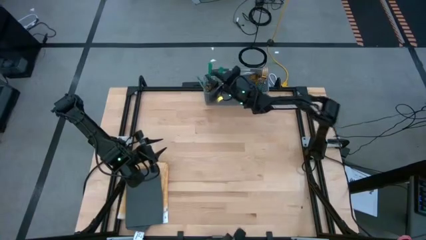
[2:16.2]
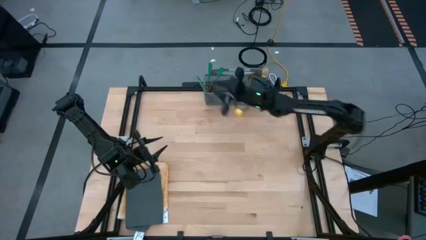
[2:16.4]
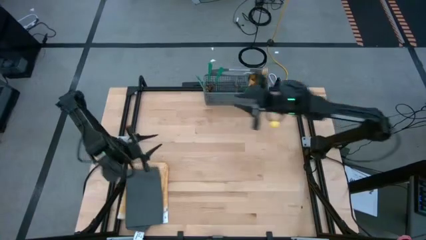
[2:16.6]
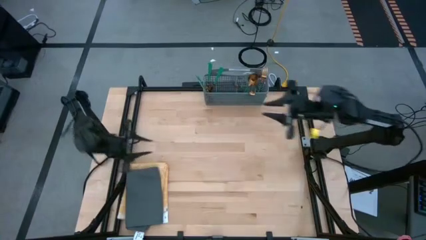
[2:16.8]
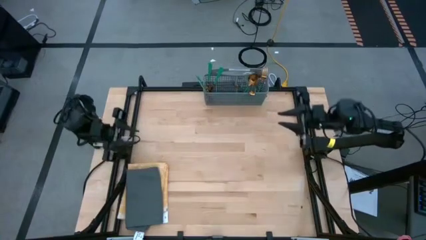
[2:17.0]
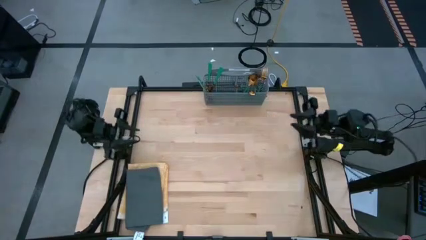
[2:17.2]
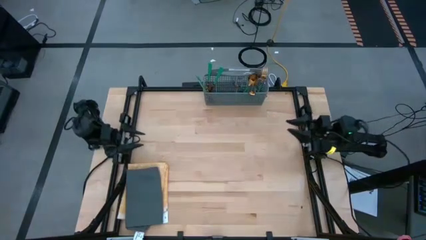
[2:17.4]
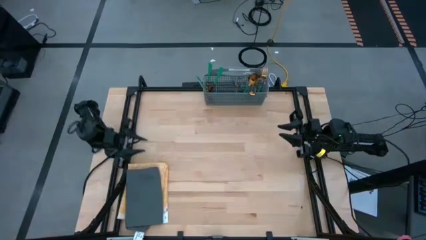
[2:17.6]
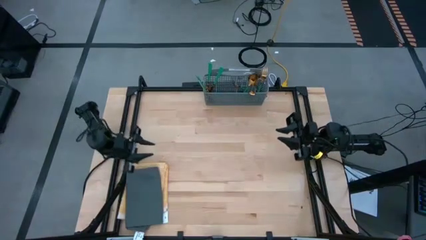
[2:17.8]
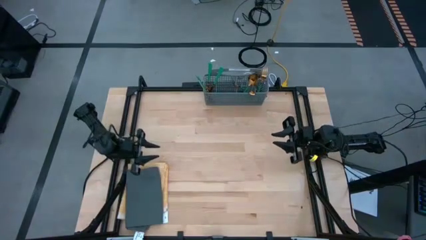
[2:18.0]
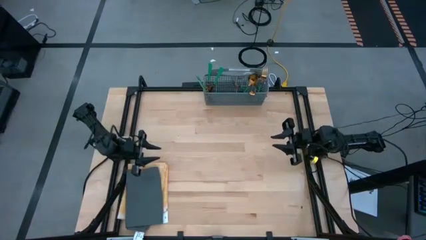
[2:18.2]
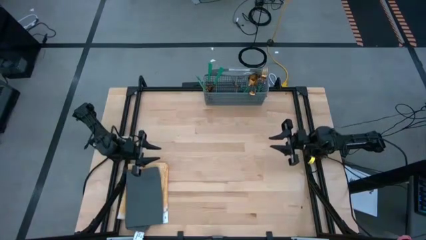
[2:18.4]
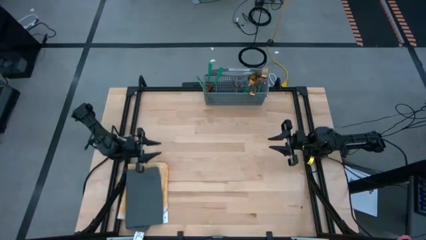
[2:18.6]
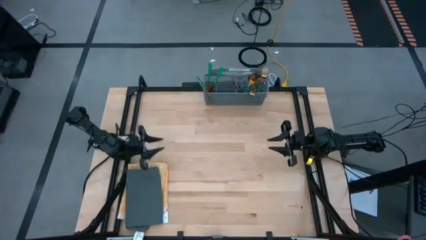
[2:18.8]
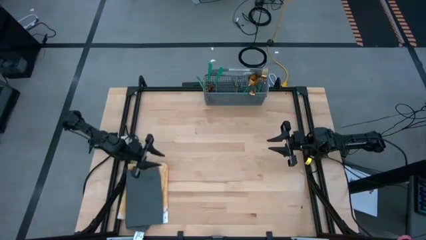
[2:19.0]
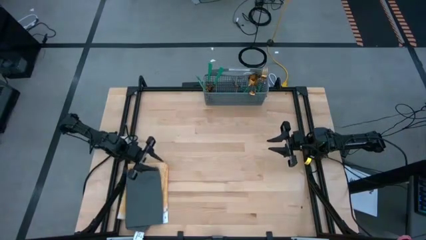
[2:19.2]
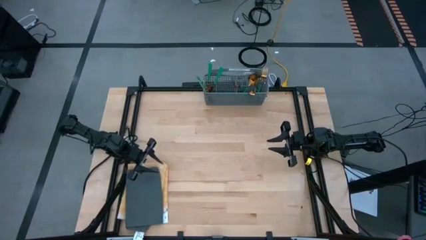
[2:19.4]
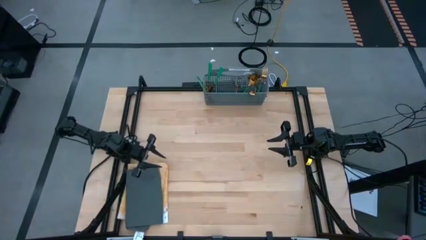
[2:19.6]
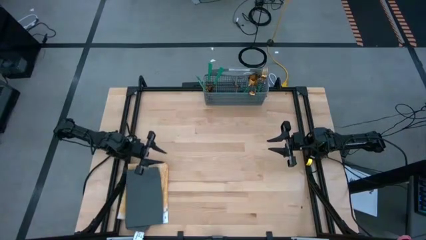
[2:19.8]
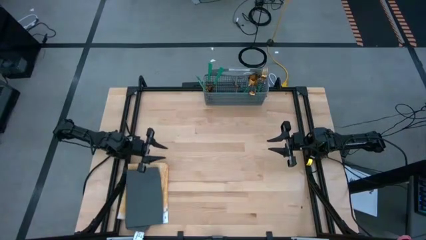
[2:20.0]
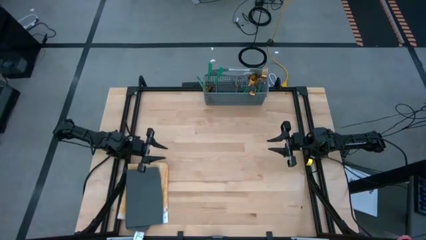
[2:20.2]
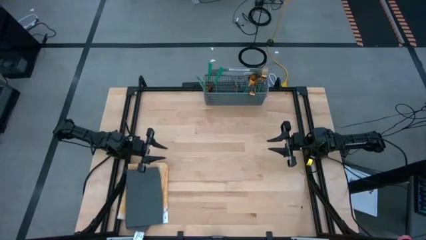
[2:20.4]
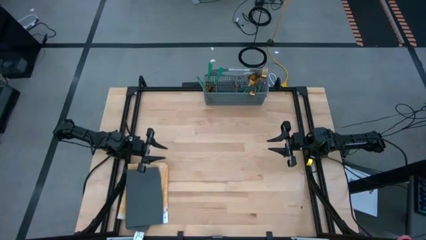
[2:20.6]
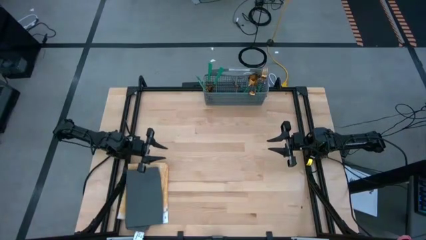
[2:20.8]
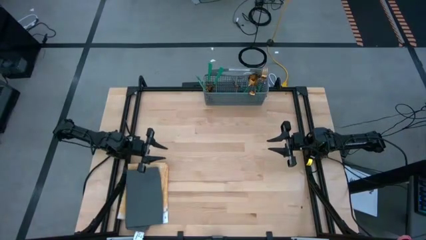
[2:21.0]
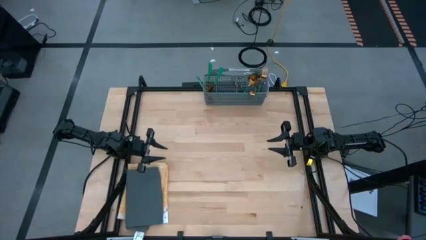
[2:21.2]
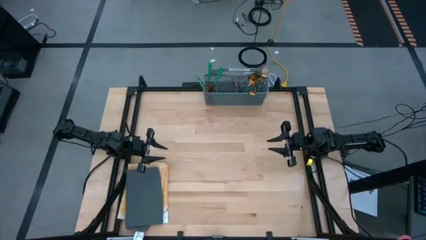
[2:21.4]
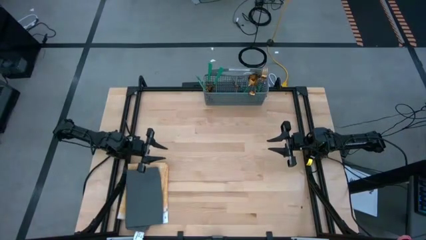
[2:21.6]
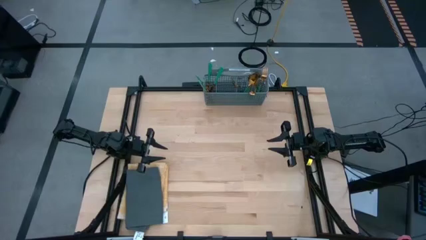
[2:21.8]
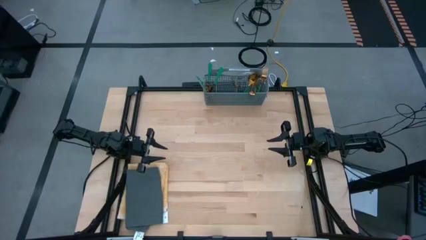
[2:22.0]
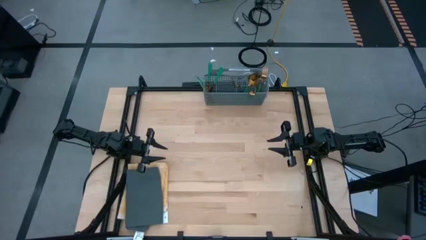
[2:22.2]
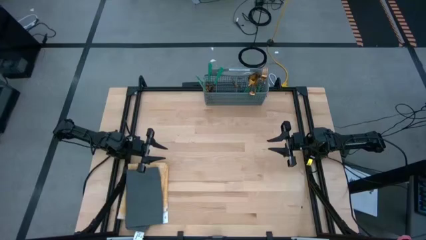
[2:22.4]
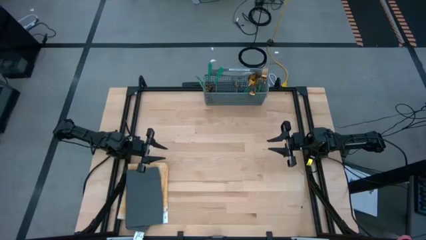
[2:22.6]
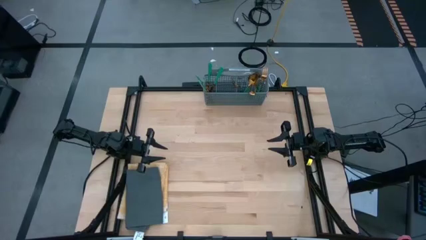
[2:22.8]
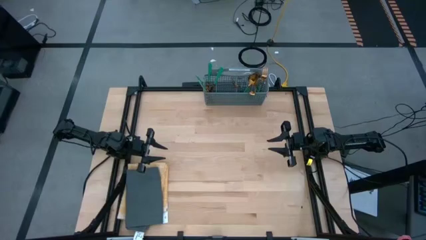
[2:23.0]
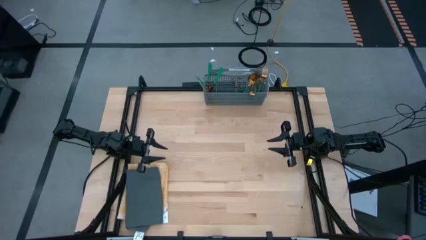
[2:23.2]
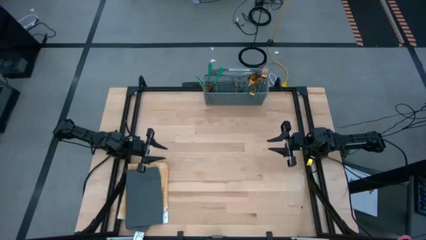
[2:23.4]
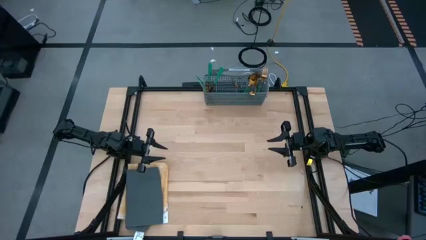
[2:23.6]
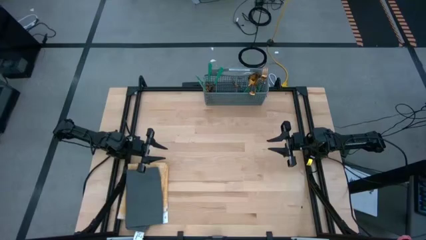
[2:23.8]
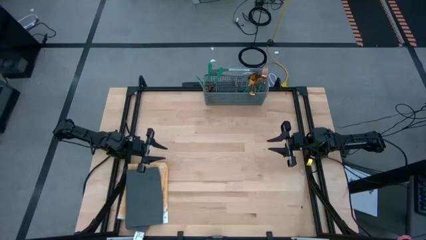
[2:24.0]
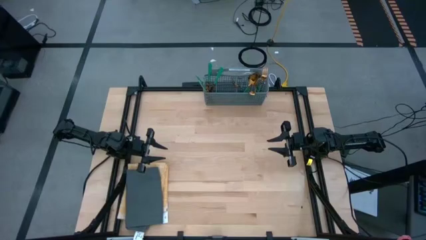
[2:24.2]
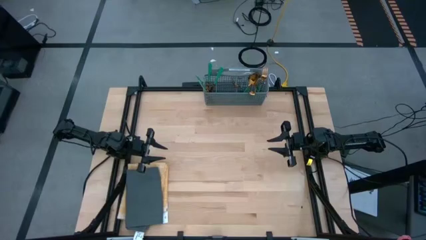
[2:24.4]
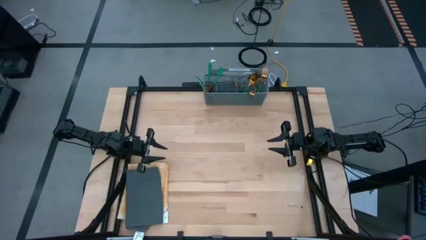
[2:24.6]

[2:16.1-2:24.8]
Task: Sort silverware
Return to Home Position

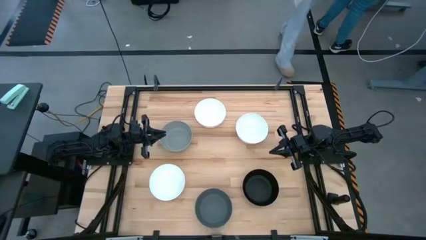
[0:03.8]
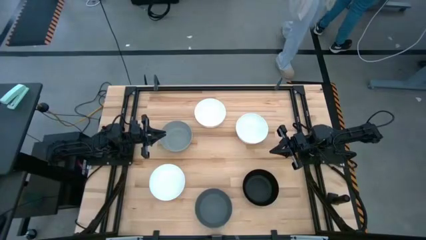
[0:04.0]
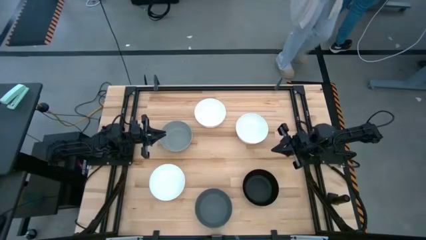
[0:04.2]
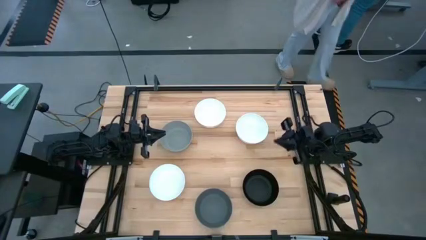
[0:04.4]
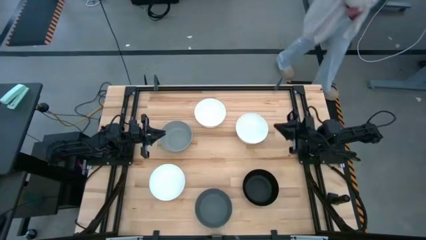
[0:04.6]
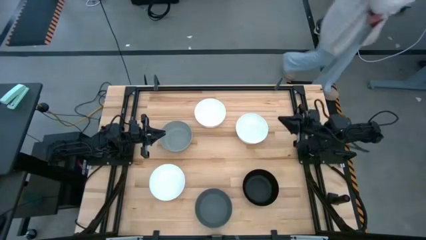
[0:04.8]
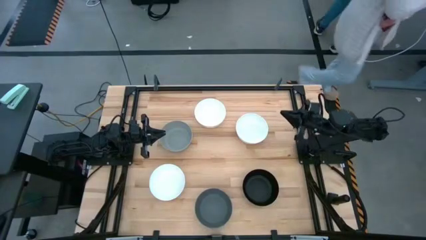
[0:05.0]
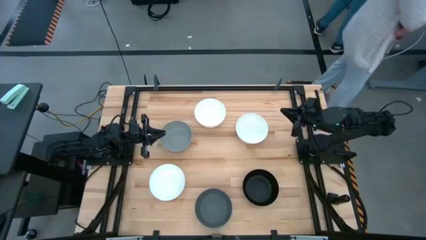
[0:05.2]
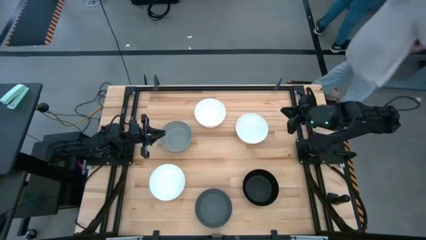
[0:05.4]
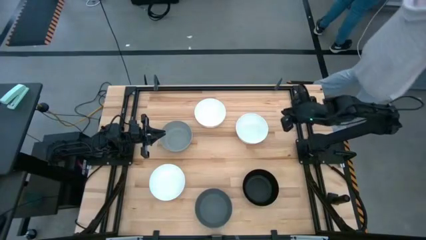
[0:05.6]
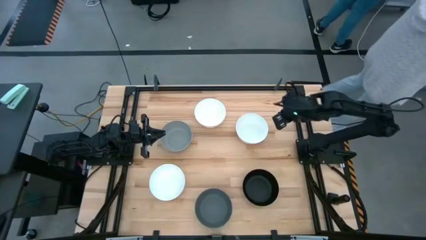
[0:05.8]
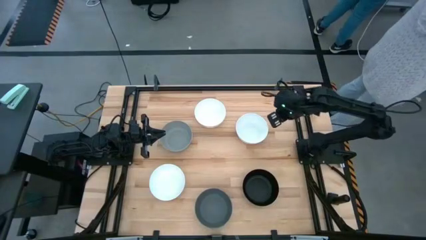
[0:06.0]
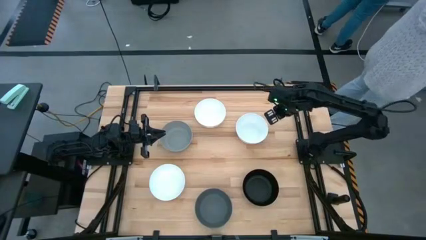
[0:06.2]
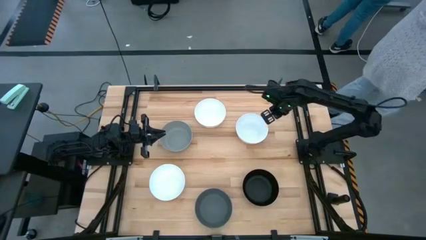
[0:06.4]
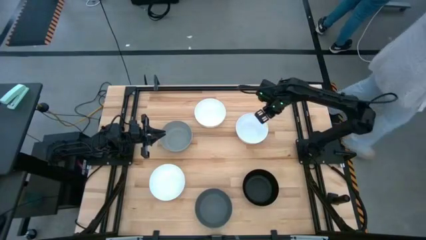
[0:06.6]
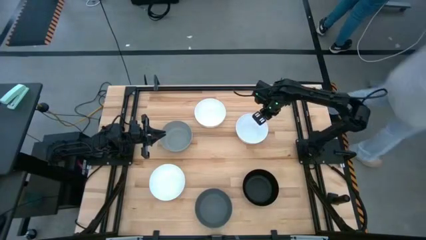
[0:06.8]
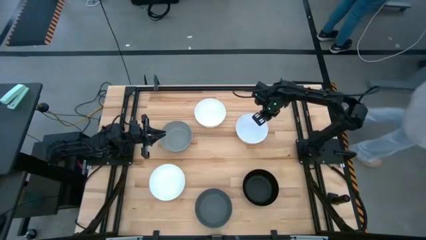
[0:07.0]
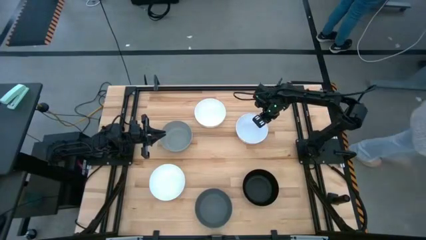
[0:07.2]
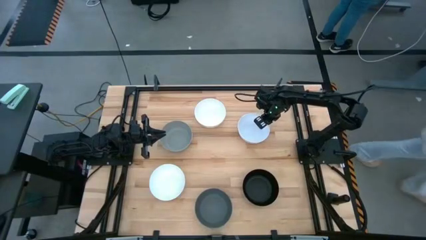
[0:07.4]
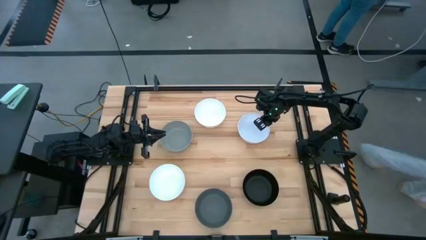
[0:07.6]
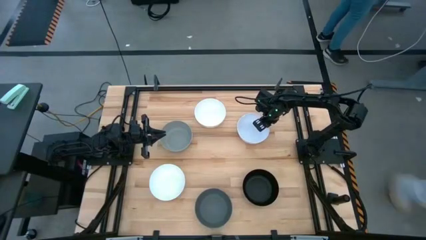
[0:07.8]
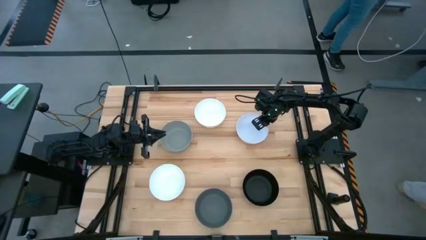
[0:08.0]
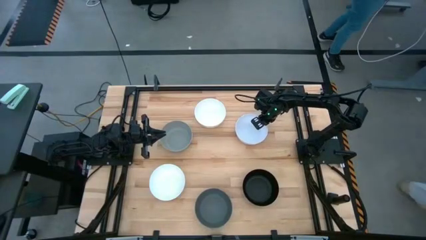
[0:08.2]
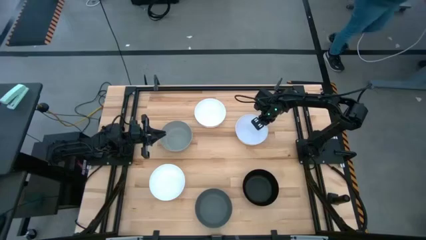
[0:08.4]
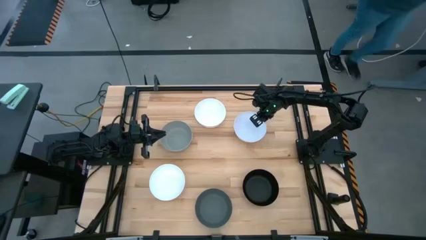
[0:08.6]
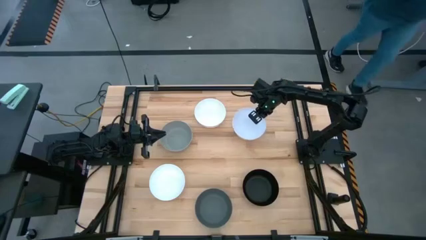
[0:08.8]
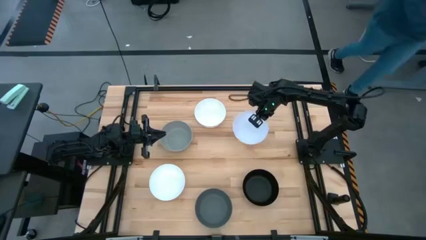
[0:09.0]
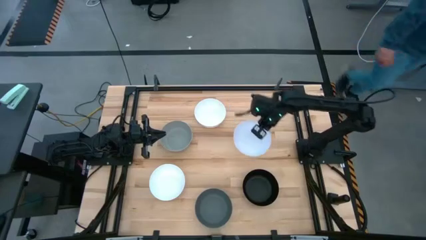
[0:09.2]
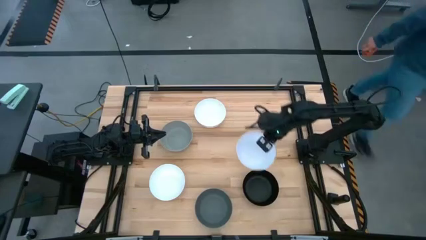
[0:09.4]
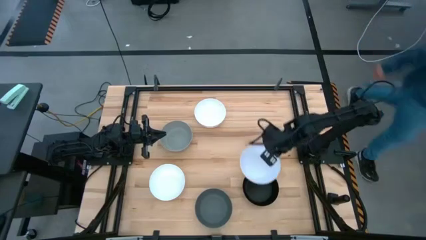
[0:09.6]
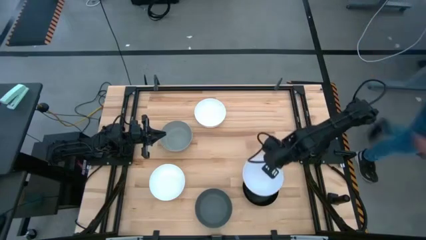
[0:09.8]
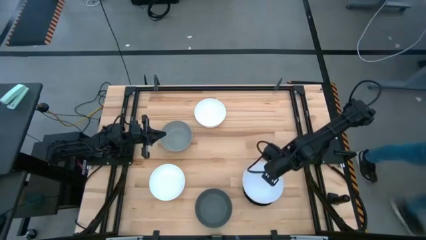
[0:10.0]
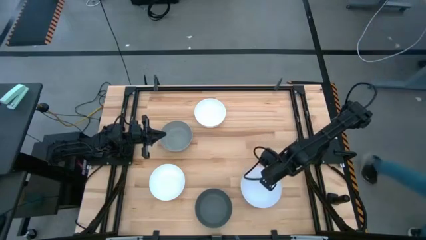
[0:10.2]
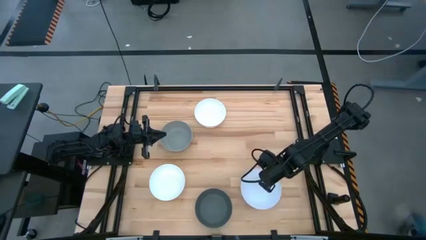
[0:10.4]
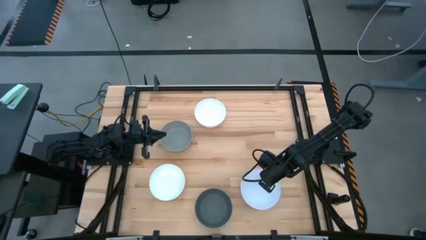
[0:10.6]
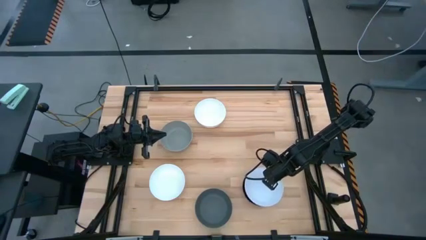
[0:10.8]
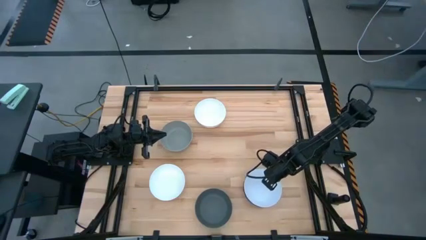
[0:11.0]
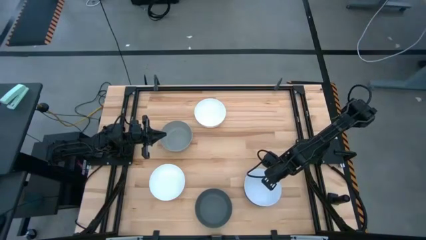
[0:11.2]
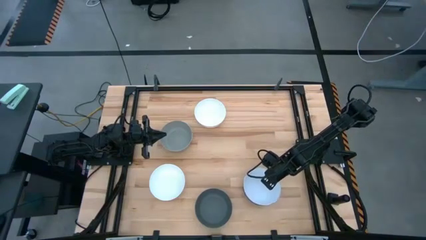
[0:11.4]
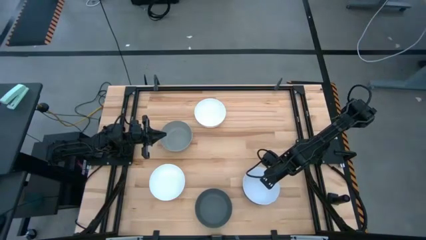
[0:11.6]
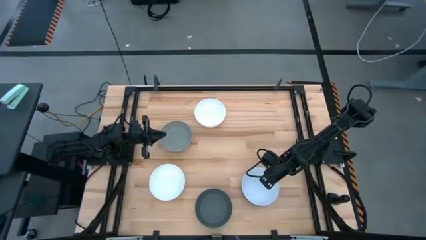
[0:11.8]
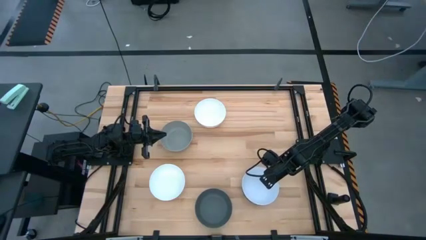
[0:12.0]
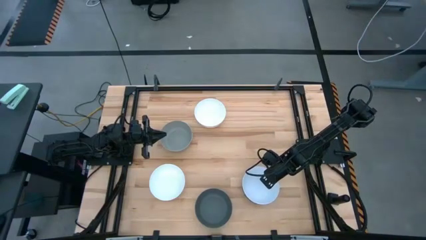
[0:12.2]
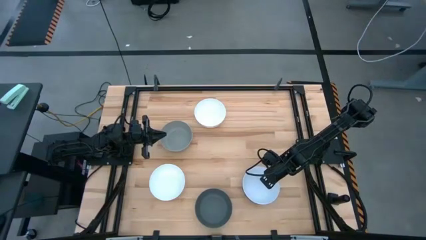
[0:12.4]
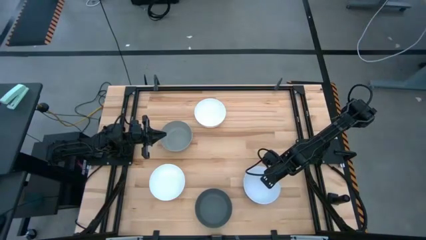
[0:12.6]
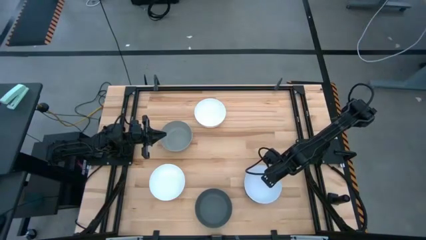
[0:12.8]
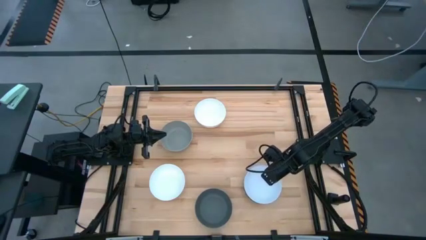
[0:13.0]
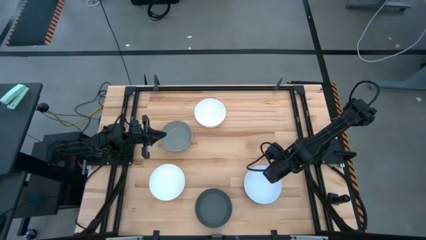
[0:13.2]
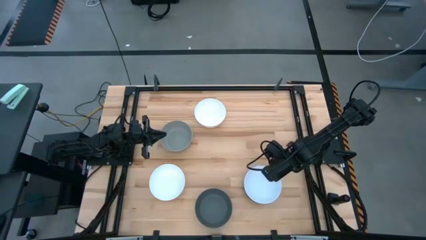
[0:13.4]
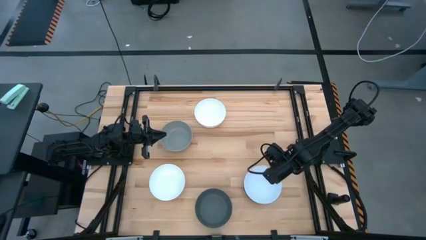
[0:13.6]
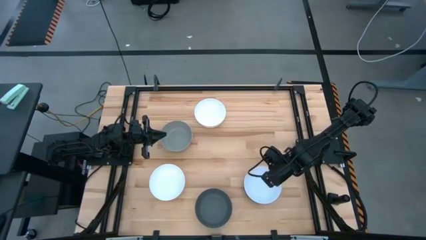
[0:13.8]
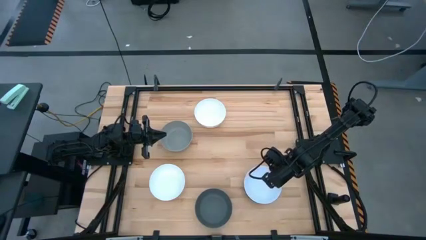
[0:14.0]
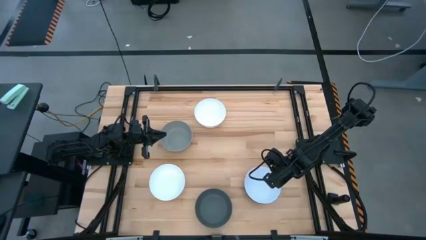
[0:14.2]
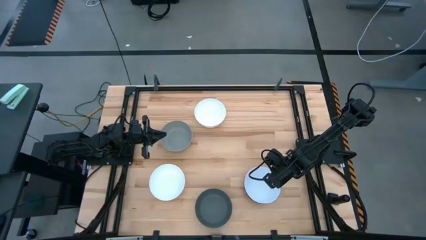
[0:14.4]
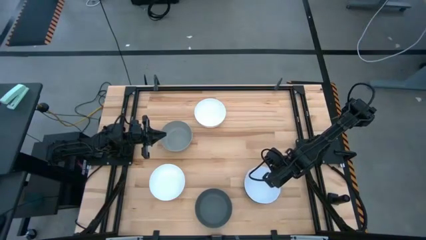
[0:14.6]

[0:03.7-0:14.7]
Task: Nest bowls inside each other
Stack the right white bowl on top of the black bowl
